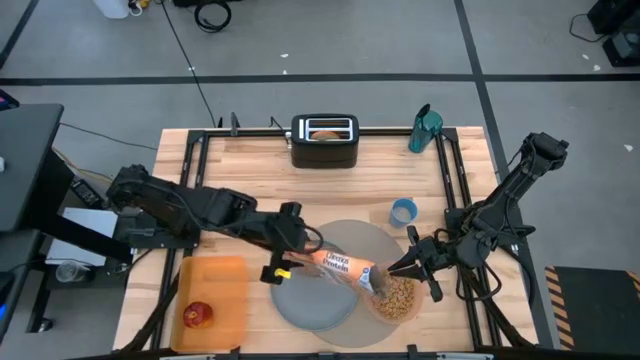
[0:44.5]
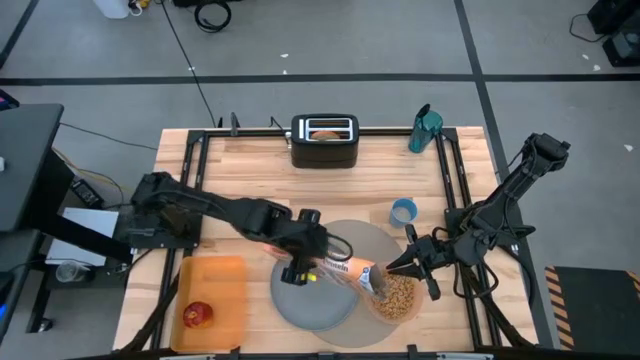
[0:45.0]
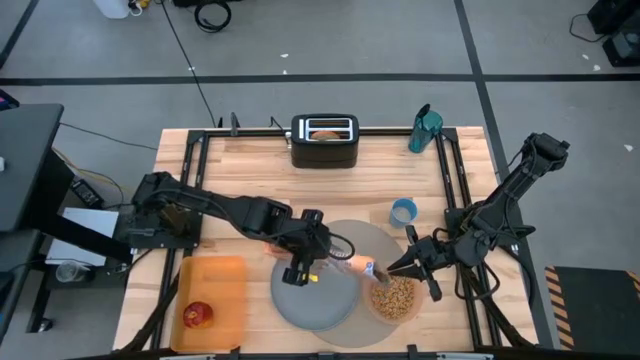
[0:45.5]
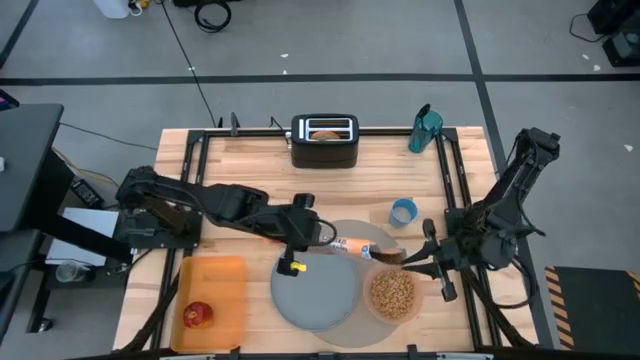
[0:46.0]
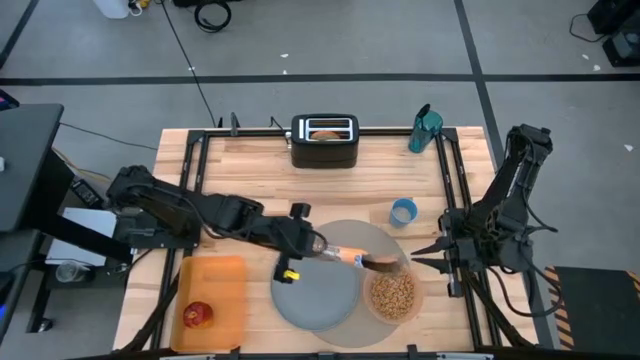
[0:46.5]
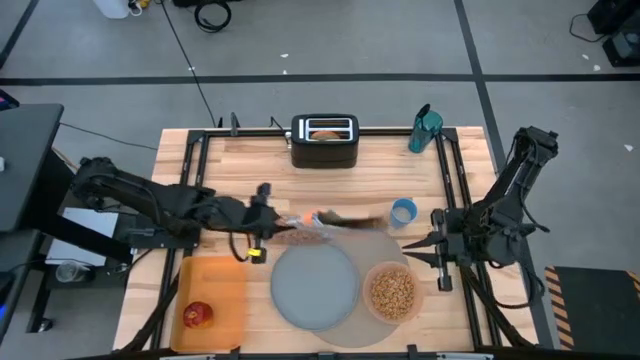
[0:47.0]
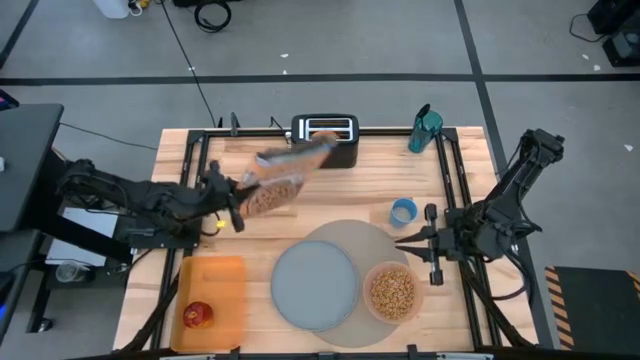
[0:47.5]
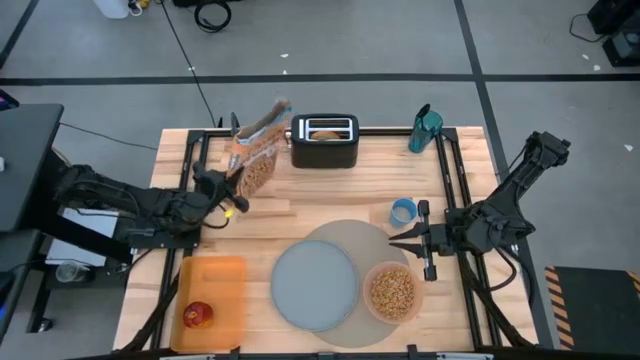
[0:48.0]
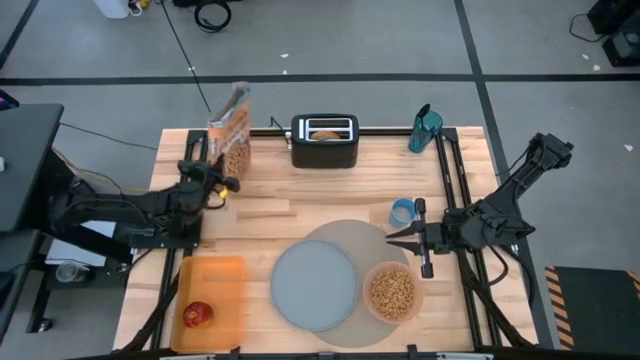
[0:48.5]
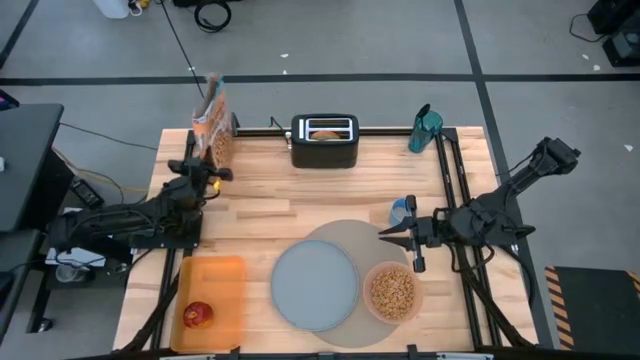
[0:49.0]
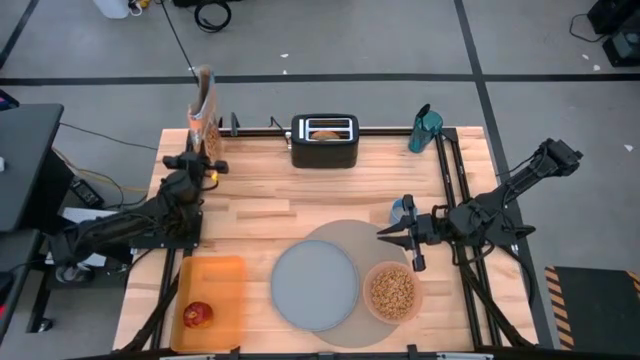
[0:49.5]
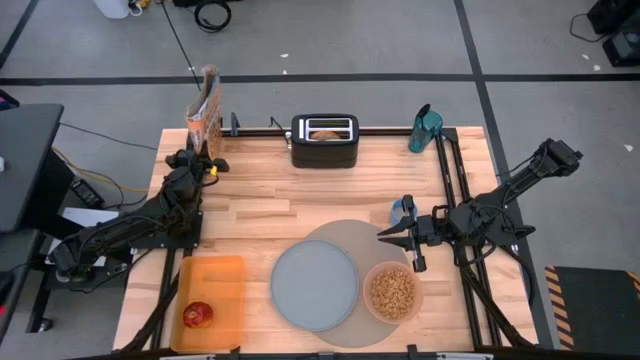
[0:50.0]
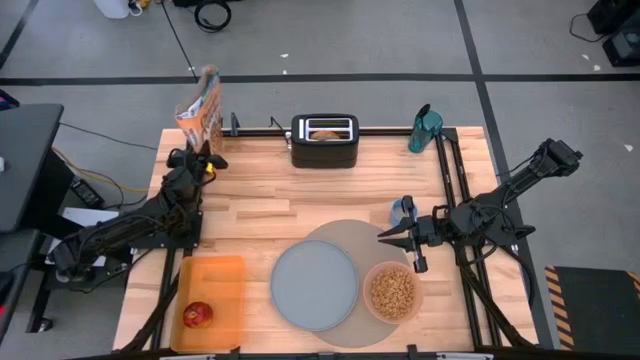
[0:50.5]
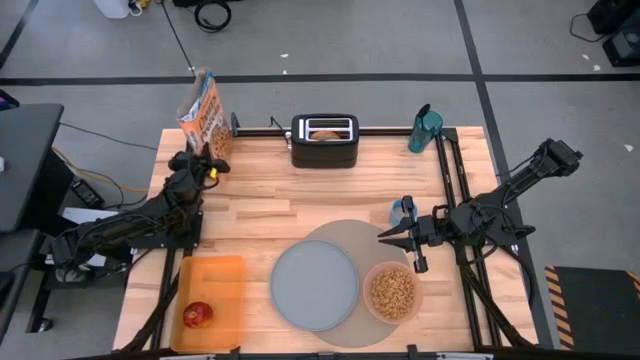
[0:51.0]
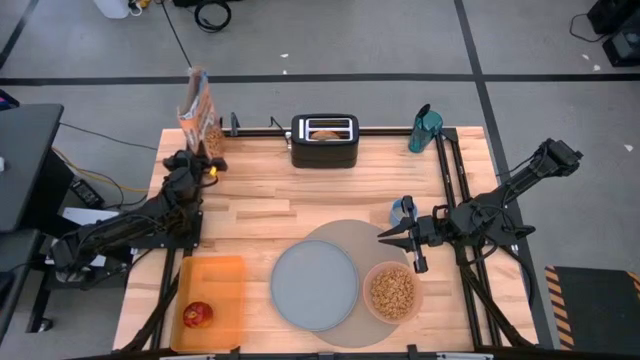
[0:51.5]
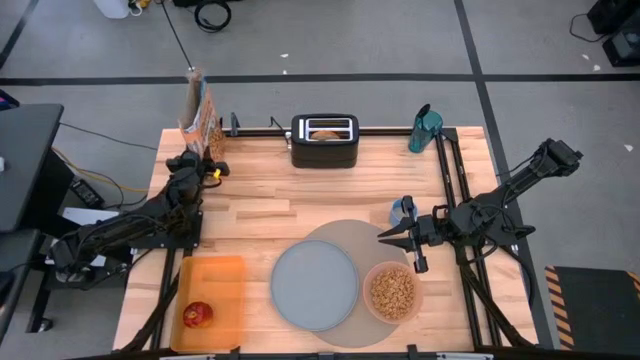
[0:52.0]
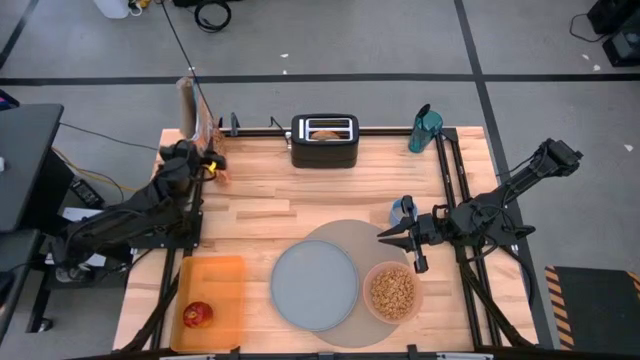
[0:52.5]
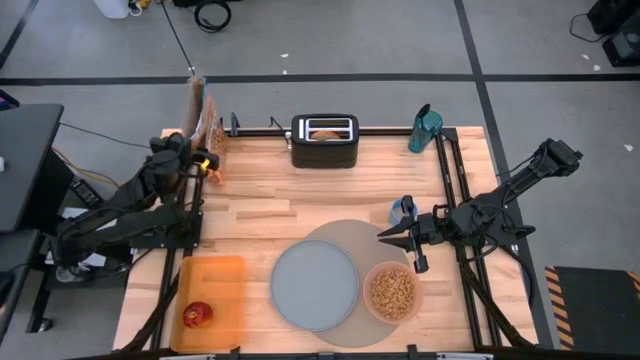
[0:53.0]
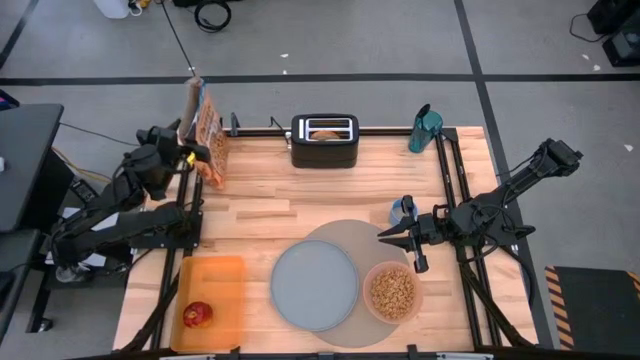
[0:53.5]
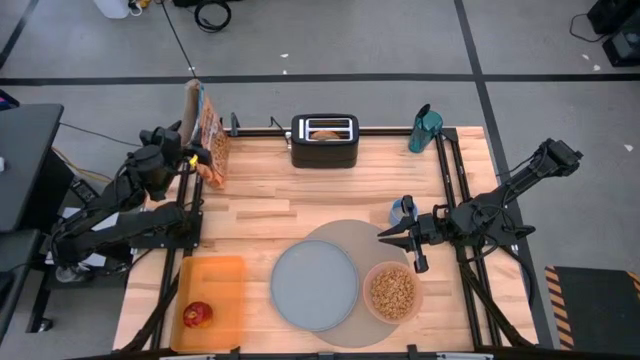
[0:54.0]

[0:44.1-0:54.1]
Task: Arrange a breakfast setting
Pour the cereal from the cereal box into the pink bowl

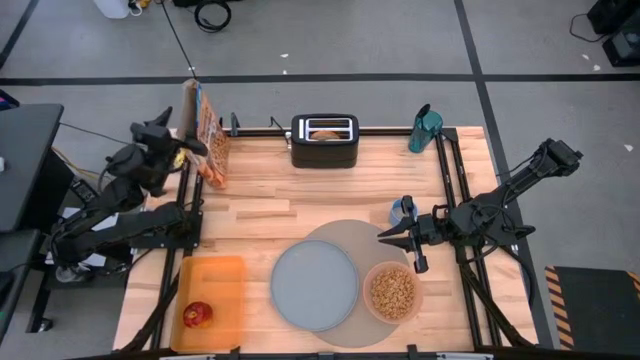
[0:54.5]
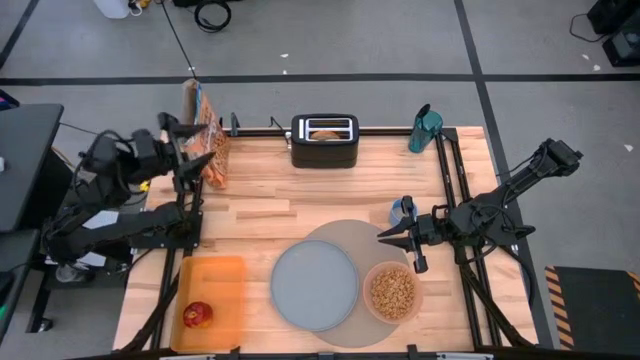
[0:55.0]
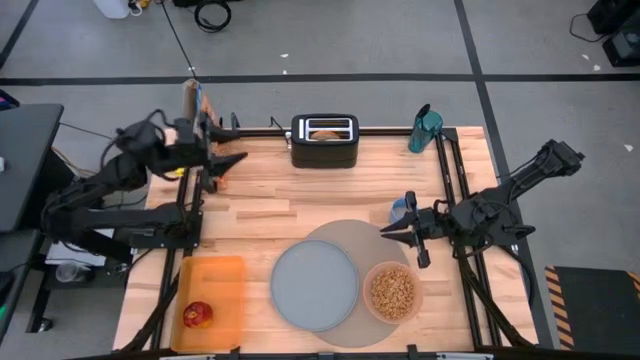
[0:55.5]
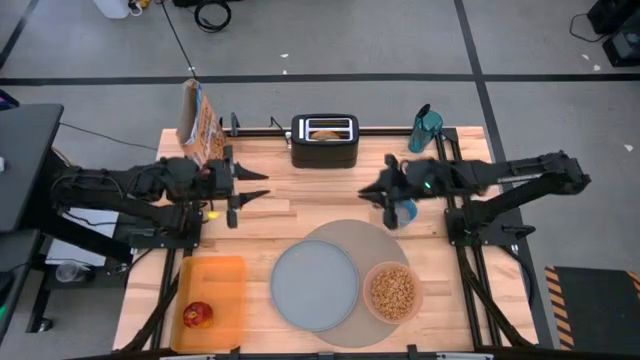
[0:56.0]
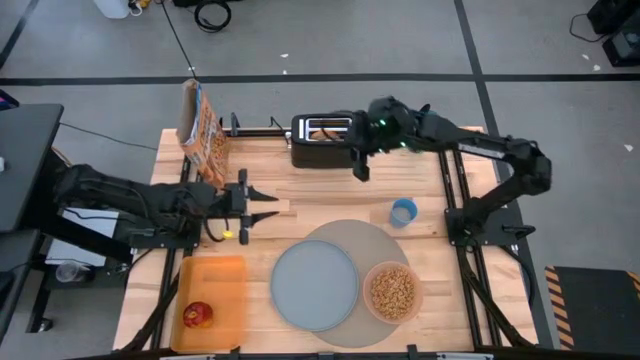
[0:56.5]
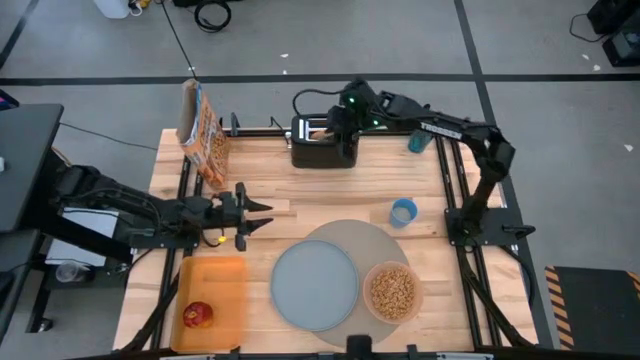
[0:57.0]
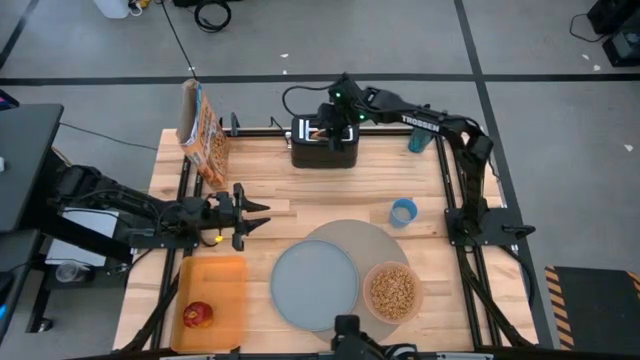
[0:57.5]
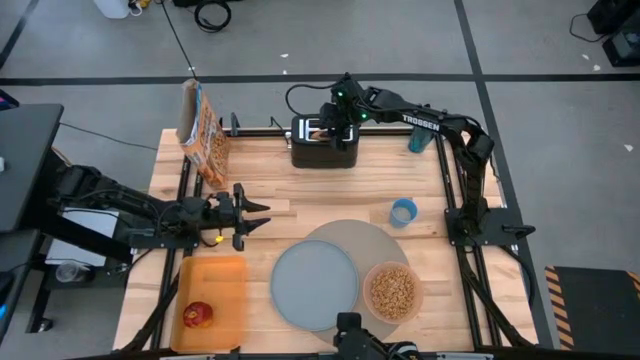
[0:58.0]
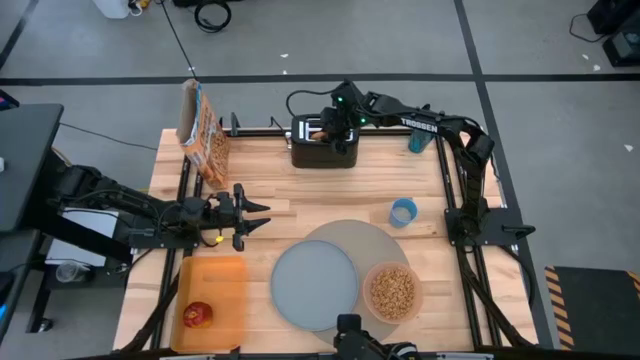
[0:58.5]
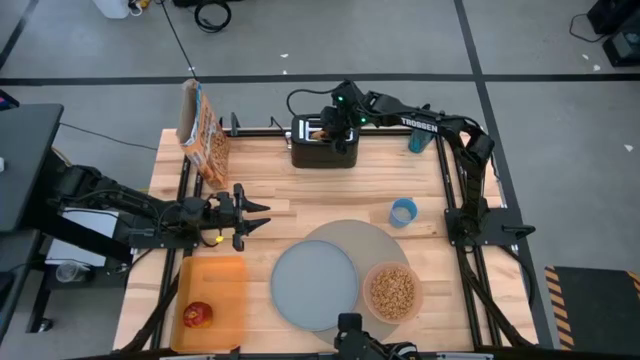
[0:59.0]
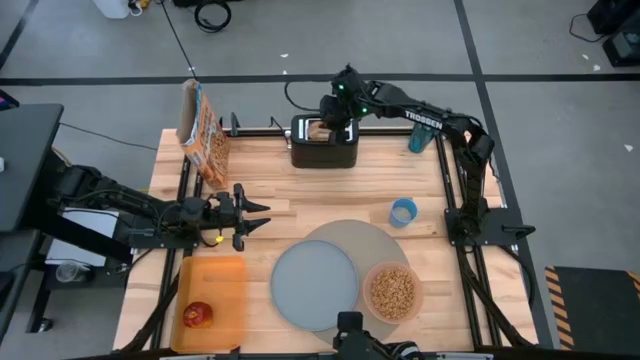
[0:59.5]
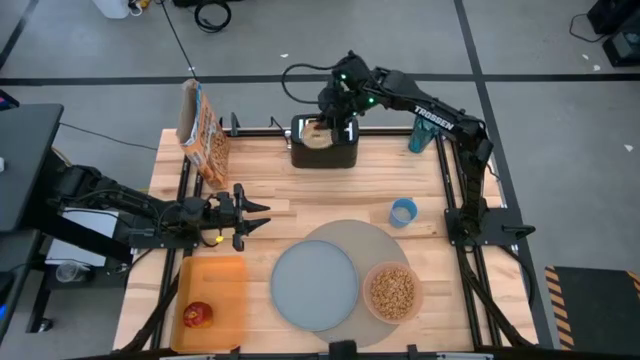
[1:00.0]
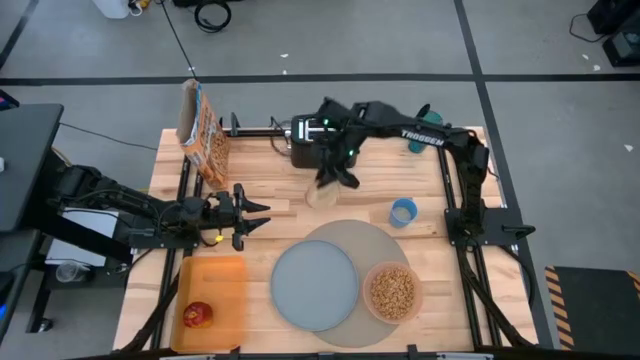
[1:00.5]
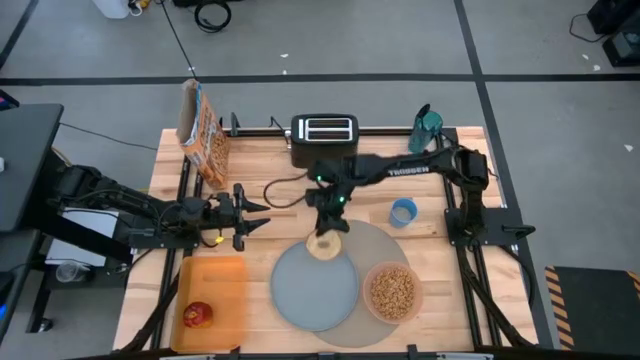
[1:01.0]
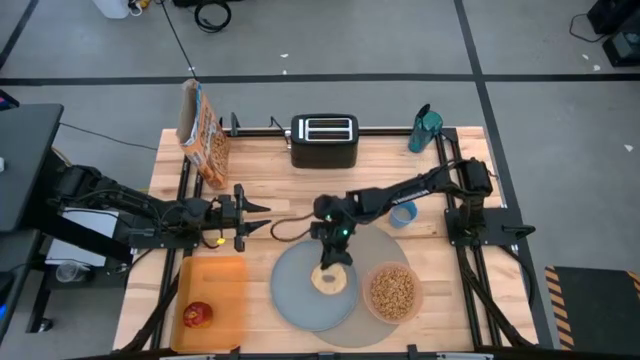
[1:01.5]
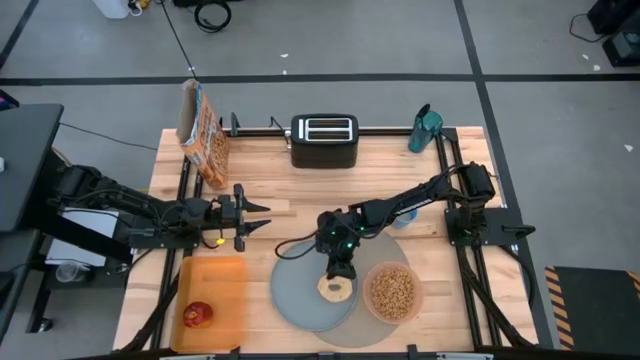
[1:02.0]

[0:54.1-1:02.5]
Put the toasted bread on the blue plate

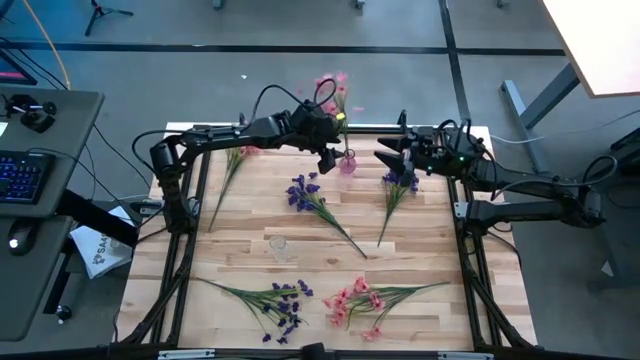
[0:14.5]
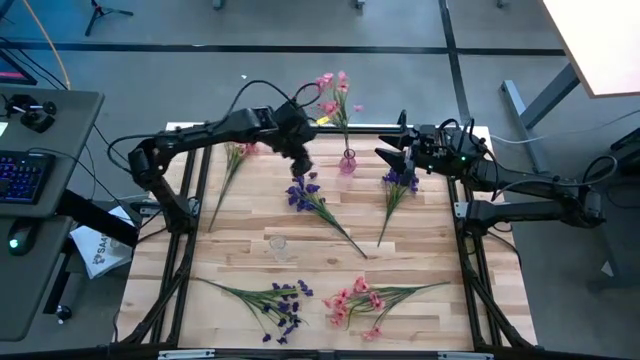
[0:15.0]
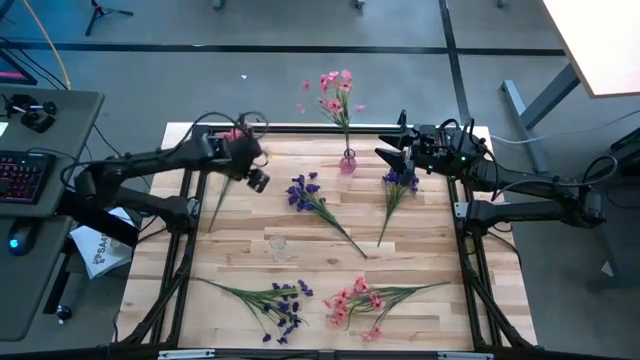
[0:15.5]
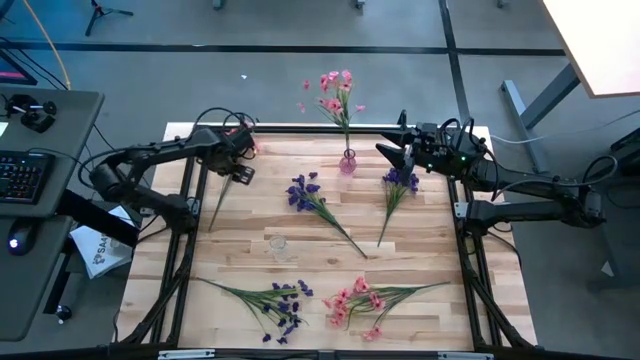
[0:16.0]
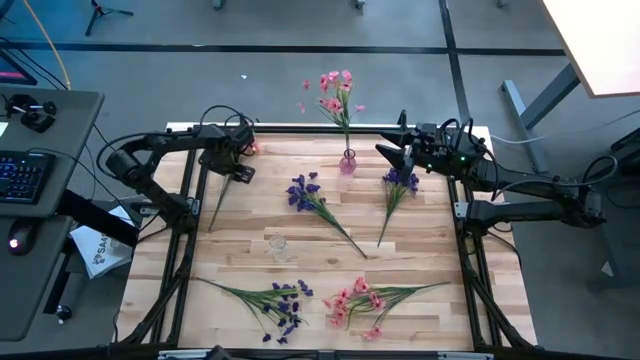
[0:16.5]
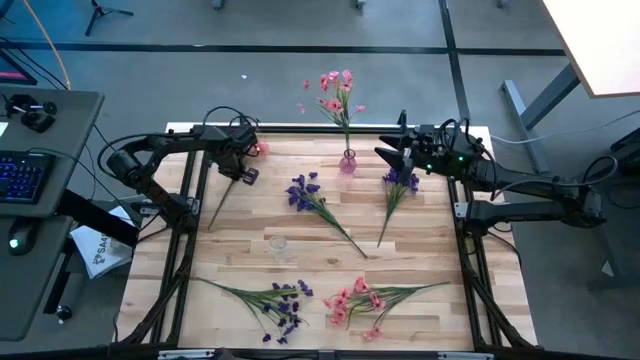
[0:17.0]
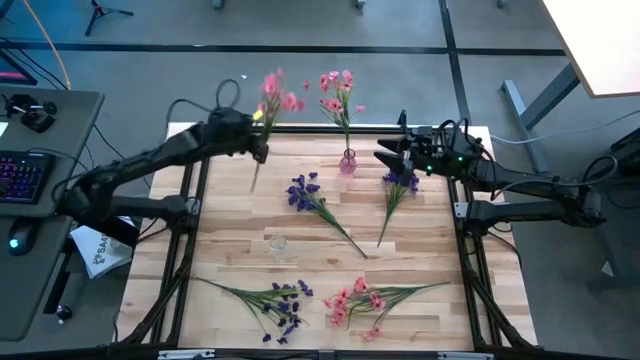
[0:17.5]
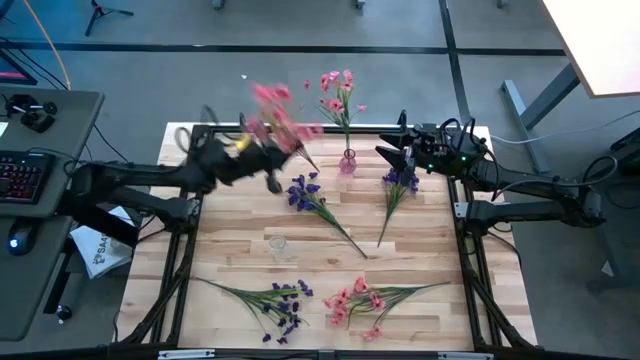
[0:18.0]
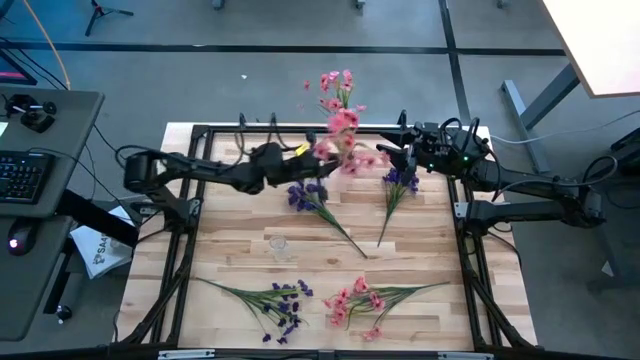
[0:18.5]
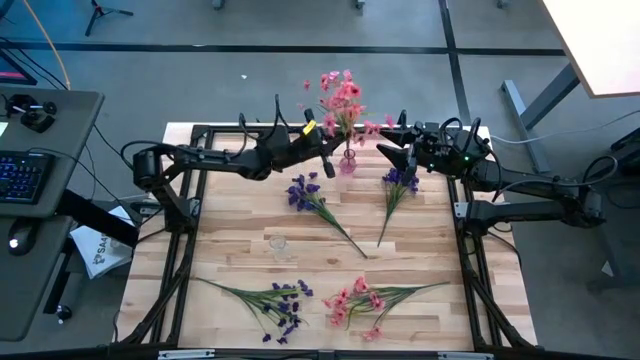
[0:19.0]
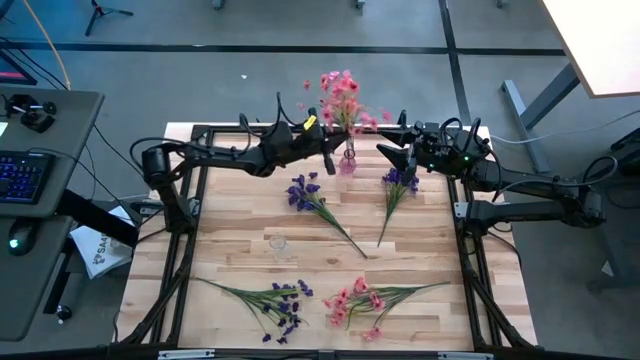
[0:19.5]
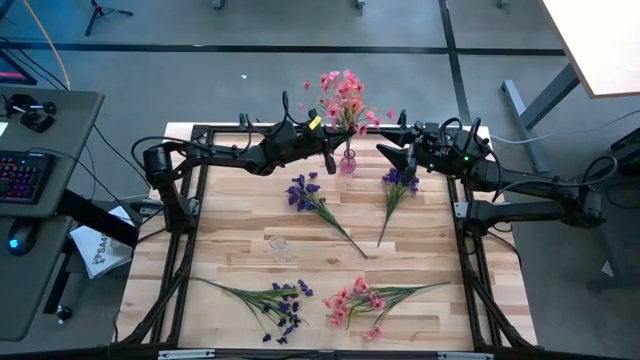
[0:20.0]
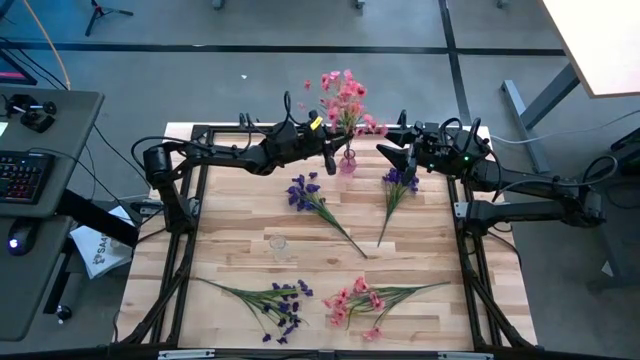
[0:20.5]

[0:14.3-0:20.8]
Task: Sort flowers into vase by color
Put the left pink flowers into the pink vase
